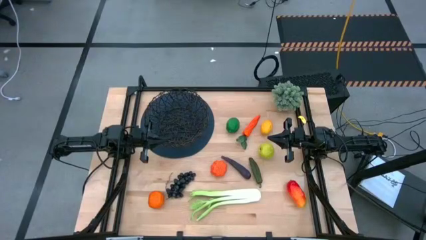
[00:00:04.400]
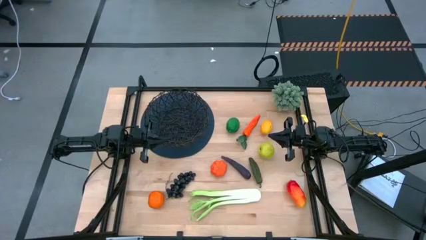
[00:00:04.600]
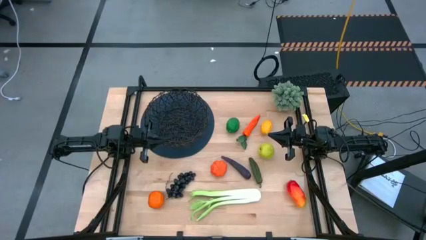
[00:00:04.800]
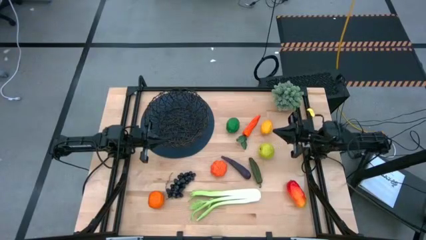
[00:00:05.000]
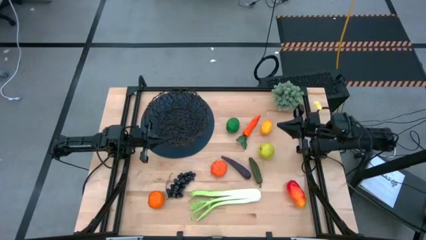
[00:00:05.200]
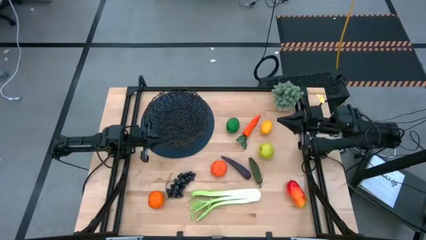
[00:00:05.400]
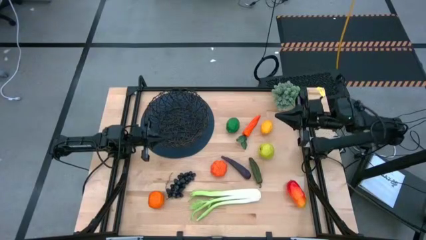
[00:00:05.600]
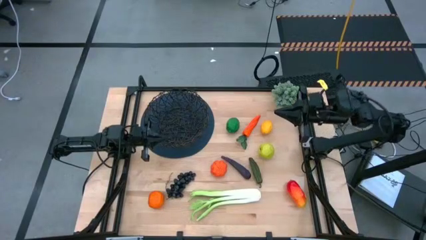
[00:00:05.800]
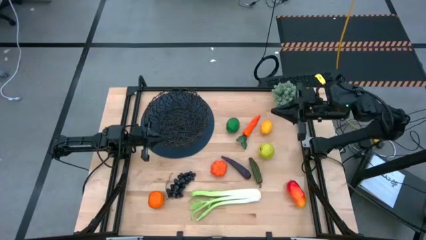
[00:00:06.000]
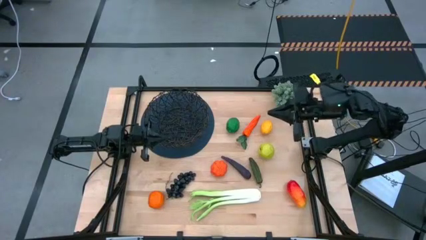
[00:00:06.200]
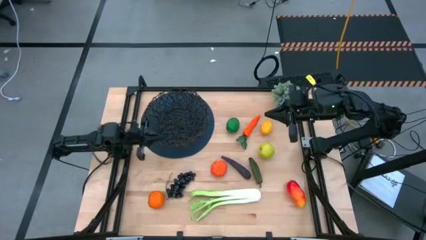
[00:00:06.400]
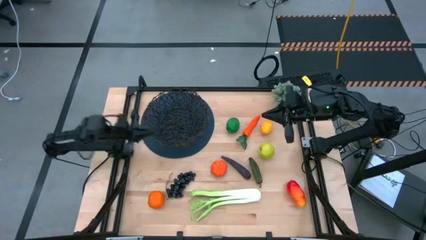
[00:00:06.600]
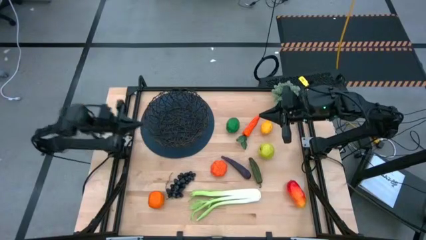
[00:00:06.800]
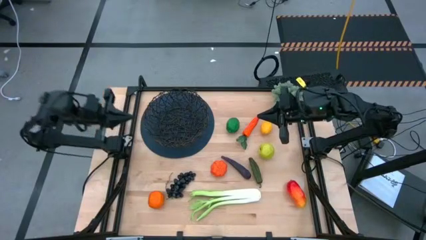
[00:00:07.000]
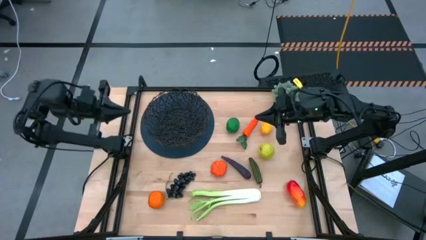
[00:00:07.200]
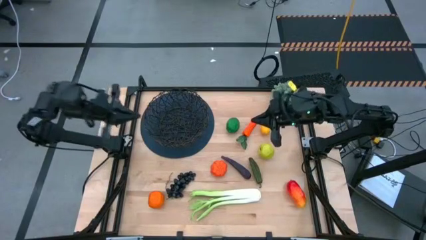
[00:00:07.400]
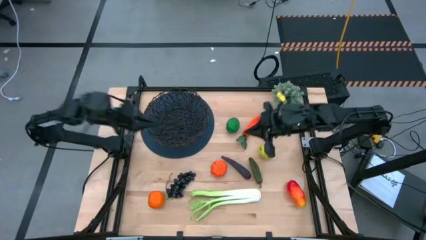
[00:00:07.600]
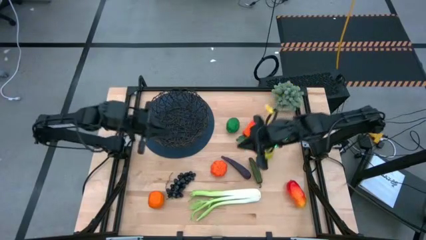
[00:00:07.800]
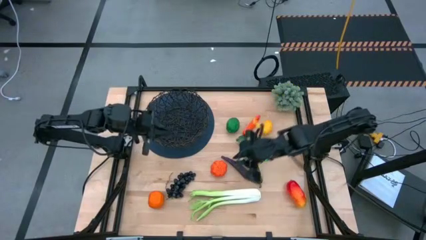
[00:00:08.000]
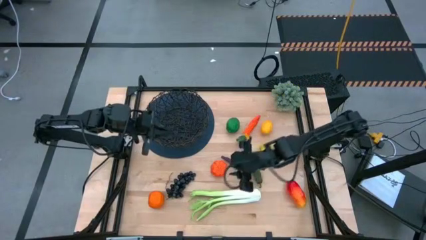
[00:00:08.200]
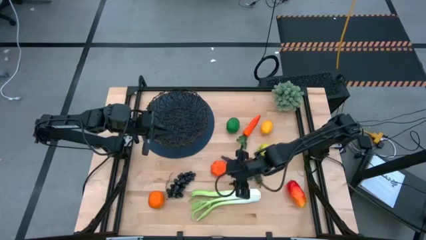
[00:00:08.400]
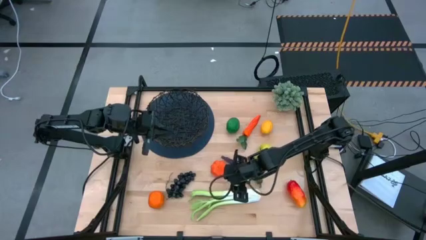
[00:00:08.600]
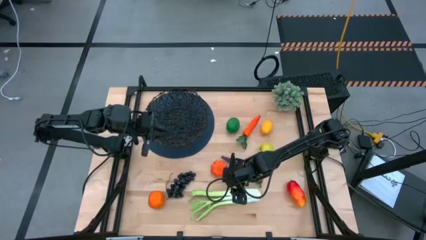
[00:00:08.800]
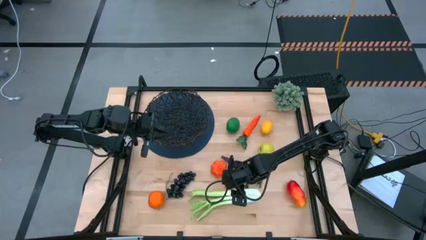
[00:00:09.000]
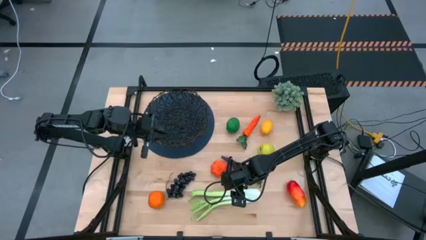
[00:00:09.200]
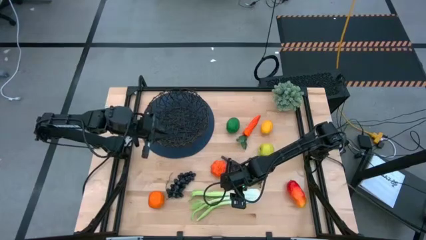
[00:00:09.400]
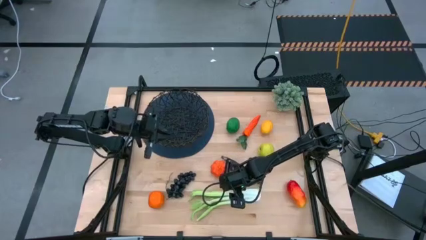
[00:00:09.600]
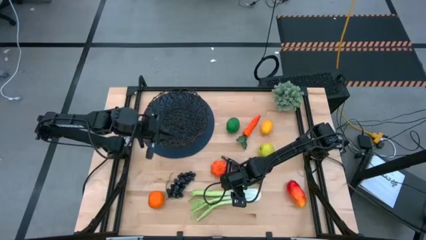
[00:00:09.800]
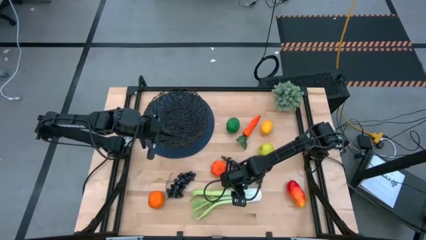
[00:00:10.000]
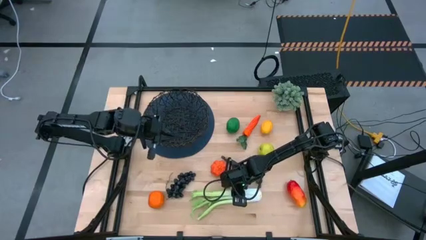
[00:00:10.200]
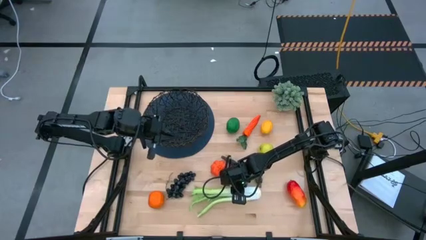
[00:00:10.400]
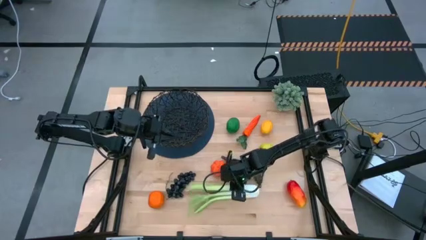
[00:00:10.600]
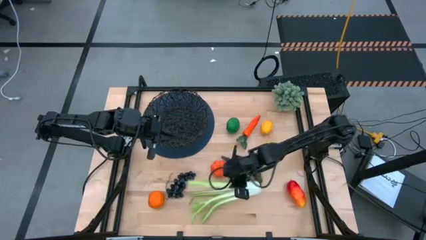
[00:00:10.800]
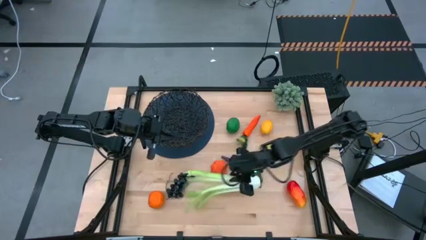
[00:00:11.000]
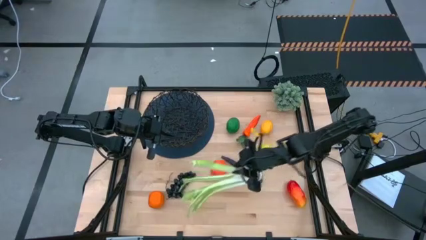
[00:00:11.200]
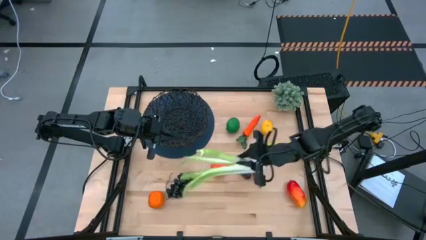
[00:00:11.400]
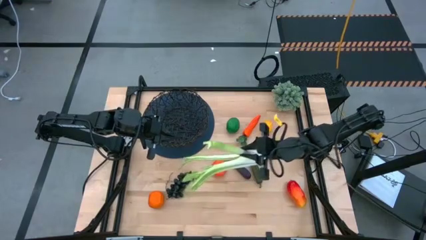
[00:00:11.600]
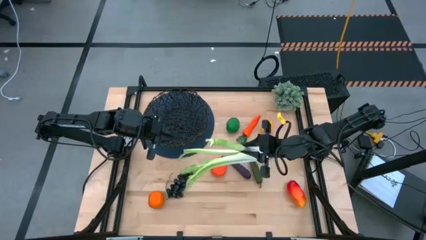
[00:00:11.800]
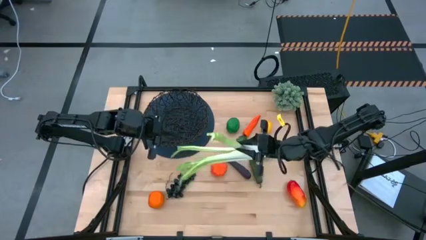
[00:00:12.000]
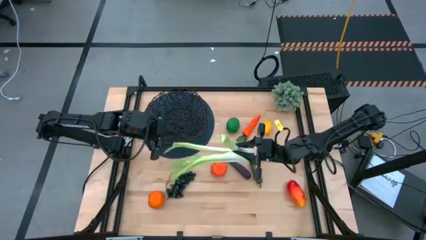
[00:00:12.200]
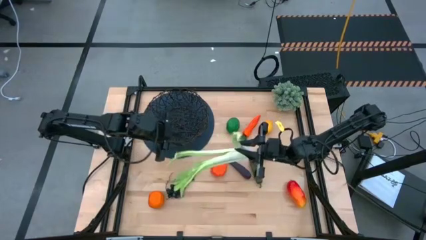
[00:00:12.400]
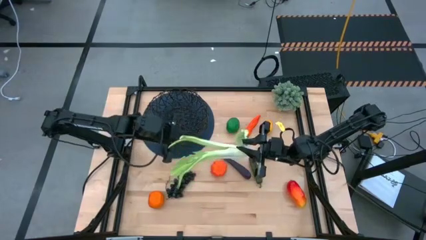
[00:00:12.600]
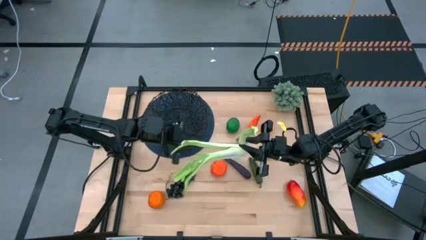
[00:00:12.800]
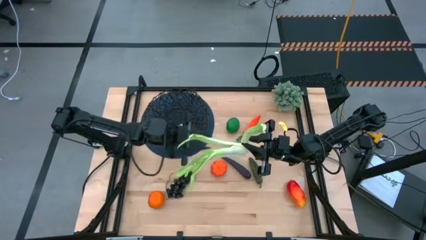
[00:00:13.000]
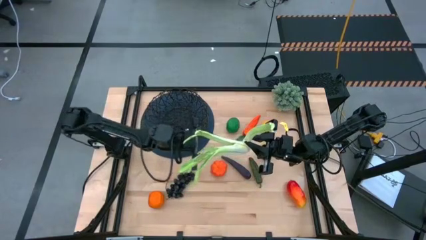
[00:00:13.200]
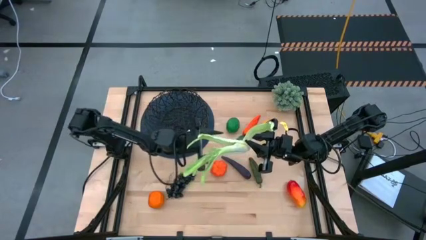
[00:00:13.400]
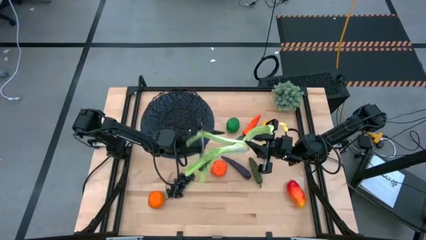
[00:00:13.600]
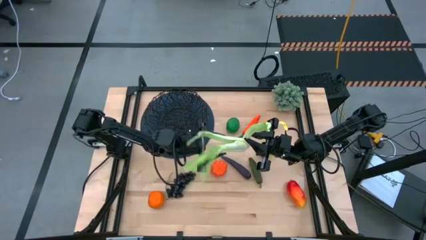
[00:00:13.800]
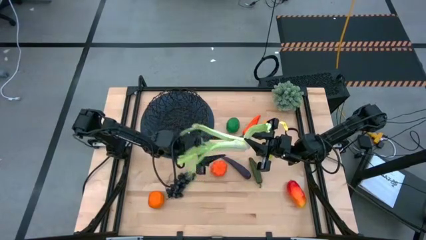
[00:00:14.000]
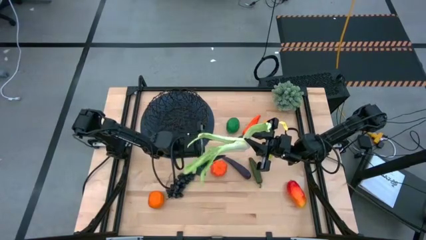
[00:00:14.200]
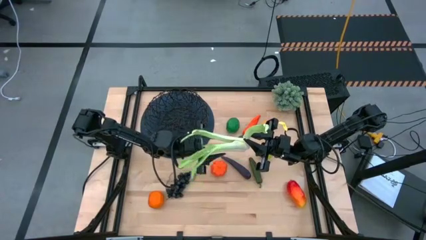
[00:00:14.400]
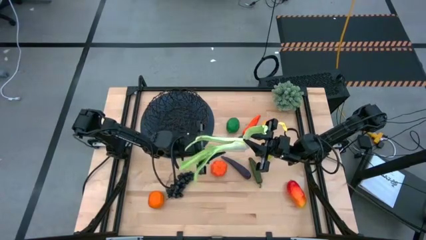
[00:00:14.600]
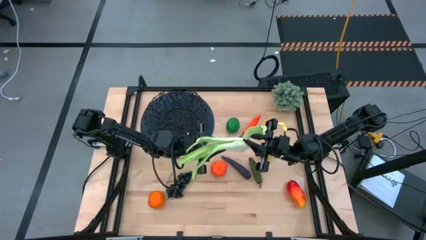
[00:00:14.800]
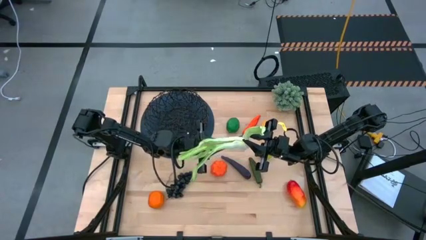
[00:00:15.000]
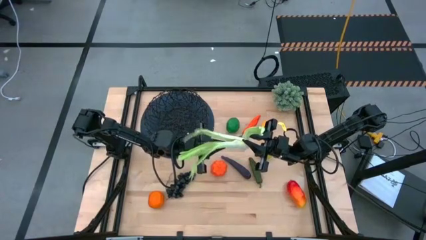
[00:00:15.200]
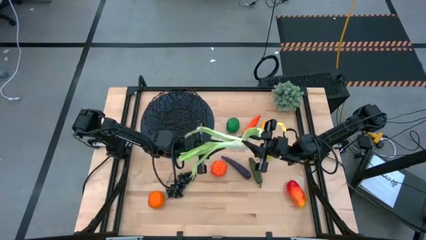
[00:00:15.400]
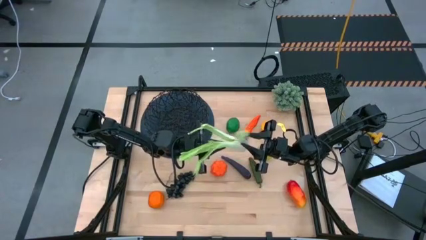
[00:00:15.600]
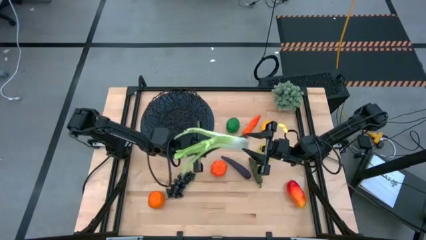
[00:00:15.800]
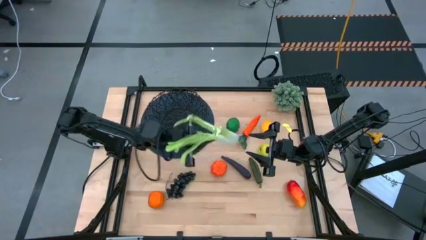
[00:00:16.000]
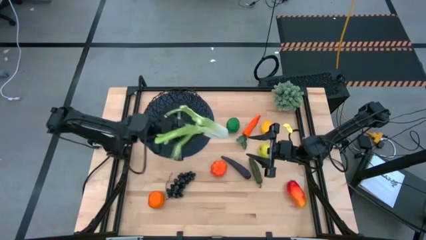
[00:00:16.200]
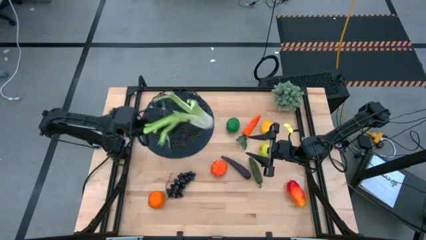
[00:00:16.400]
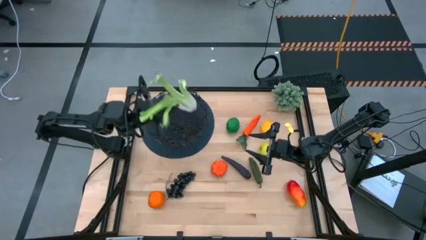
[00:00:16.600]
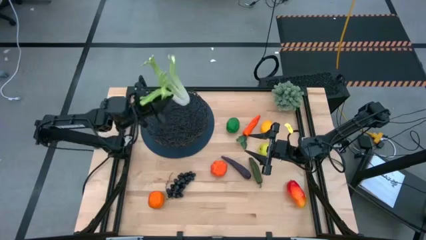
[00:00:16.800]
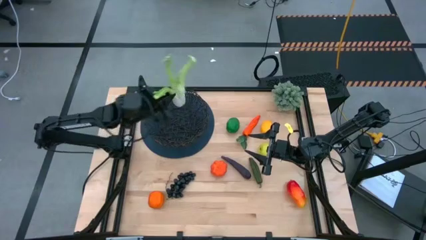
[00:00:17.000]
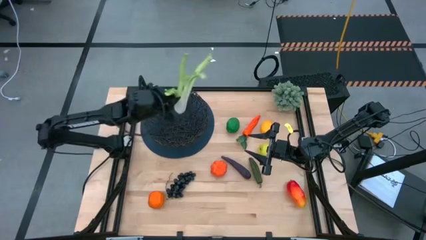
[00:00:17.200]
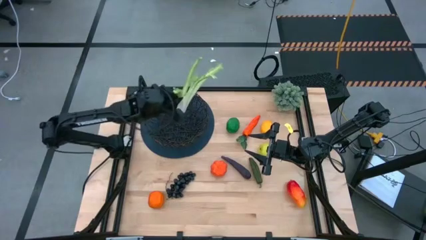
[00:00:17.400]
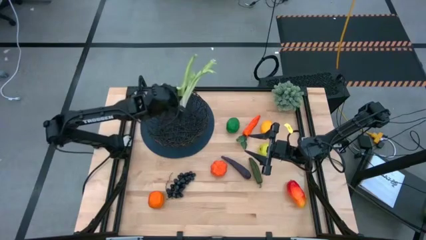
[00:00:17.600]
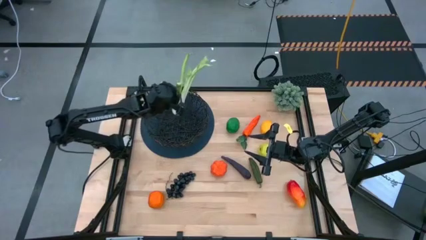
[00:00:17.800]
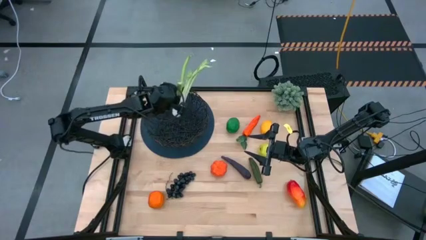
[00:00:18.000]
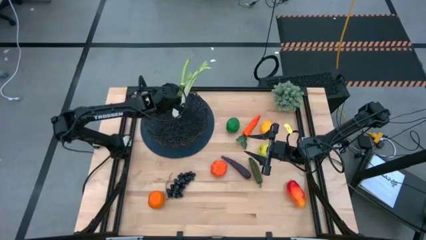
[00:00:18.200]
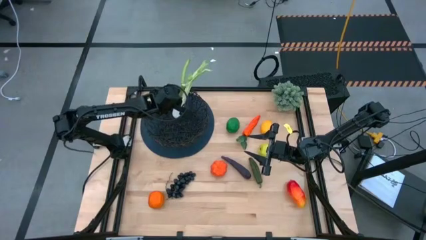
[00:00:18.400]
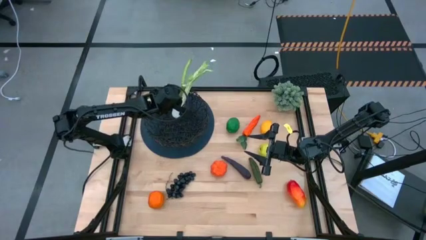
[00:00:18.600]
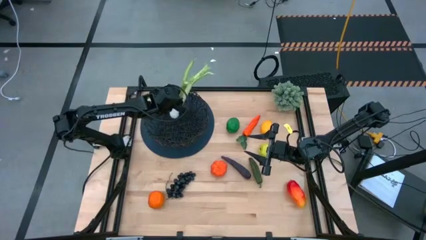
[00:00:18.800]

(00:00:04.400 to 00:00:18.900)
Task: Build produce basket
Put the green celery into the black basket

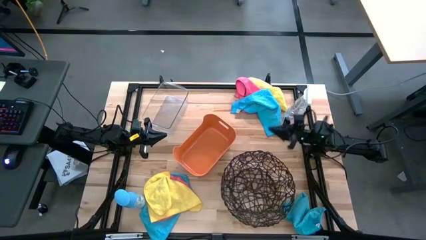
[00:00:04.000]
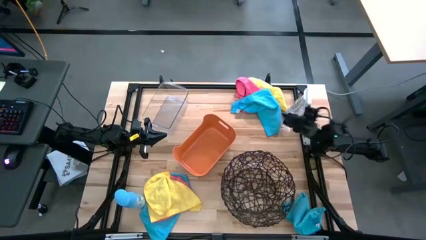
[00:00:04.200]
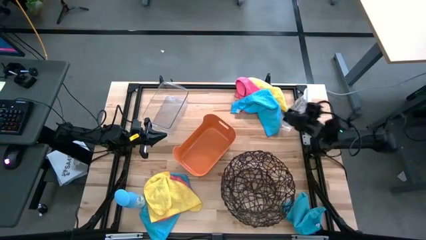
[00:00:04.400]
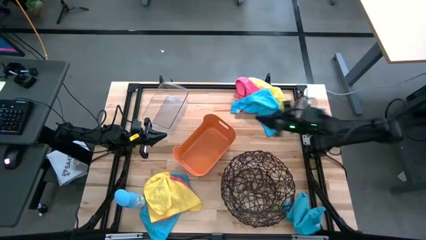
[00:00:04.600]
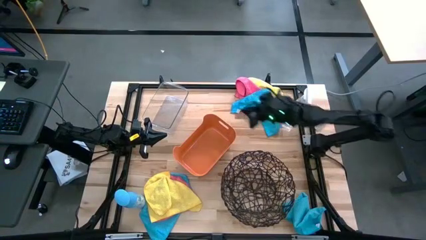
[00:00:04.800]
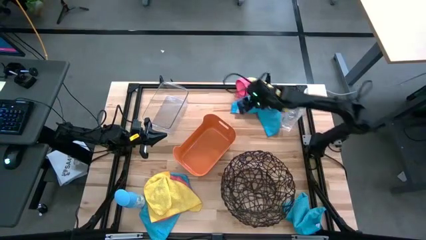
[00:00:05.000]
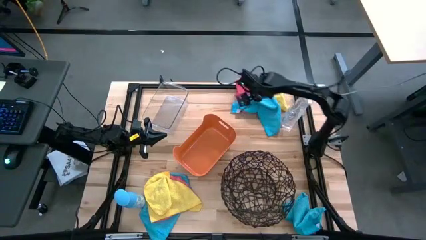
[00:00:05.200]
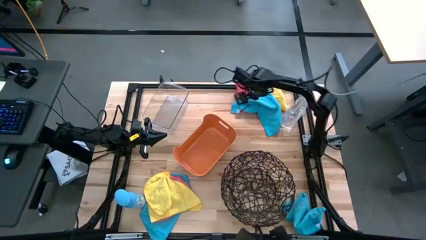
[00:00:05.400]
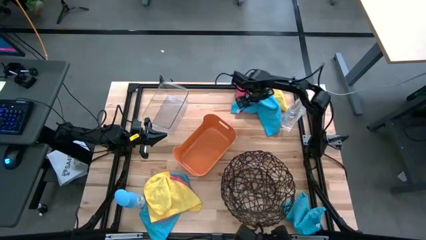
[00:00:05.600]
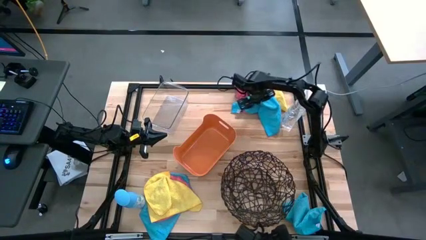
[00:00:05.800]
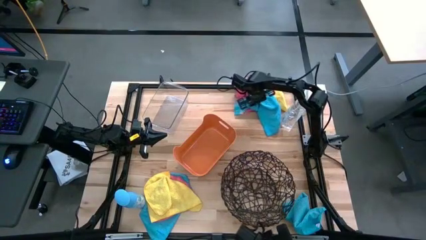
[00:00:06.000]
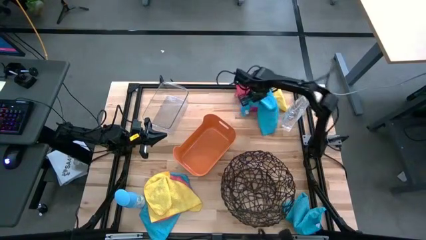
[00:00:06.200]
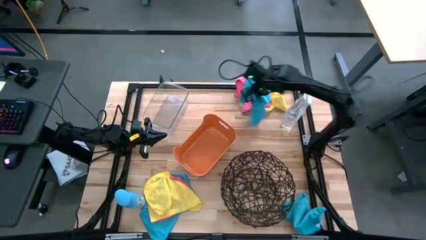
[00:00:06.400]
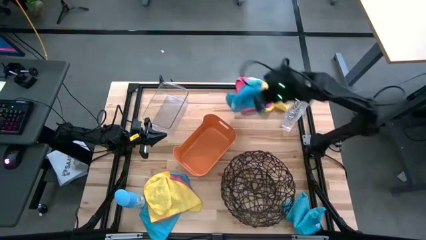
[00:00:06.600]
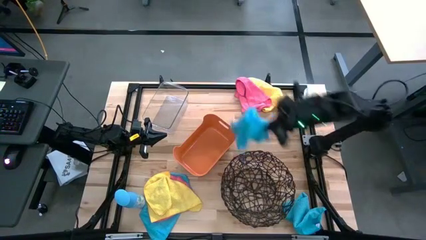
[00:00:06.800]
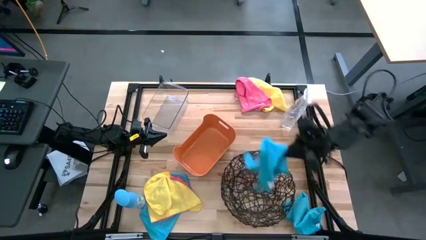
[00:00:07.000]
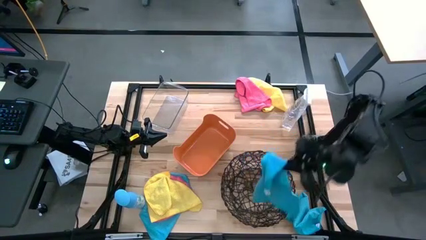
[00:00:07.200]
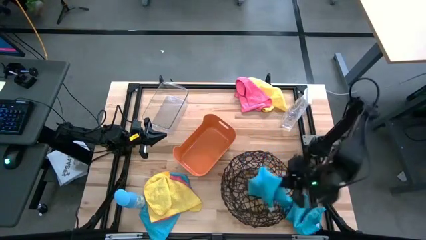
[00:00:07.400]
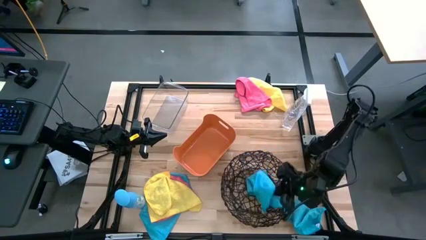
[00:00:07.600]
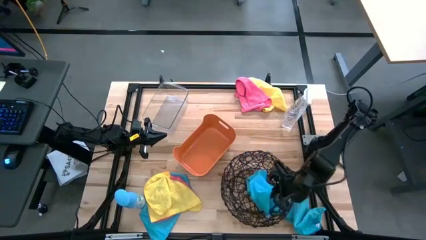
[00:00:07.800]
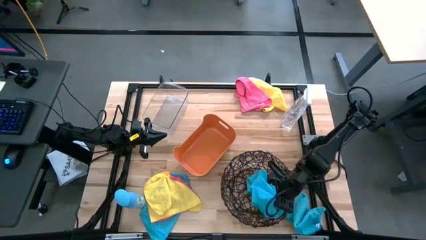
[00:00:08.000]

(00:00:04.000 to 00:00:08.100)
Task: Sort microfiber towel by color & place in baskets
Put the top blue towel into the black wire basket
